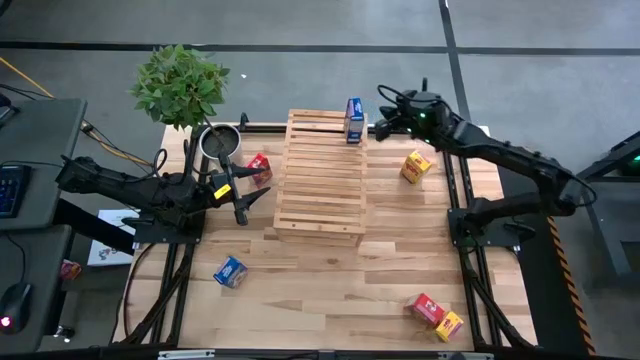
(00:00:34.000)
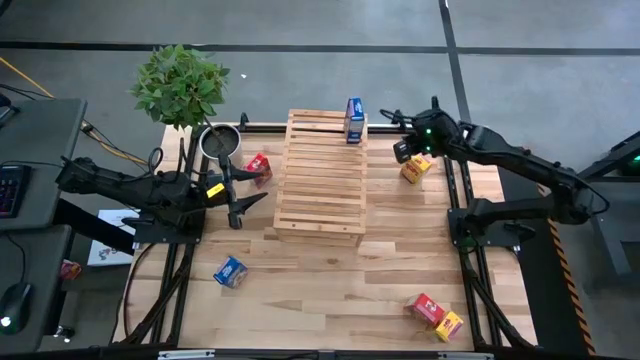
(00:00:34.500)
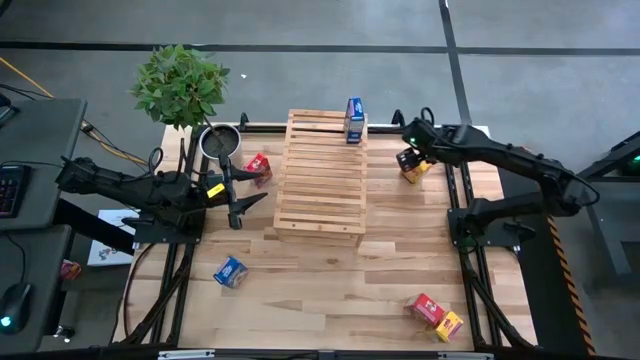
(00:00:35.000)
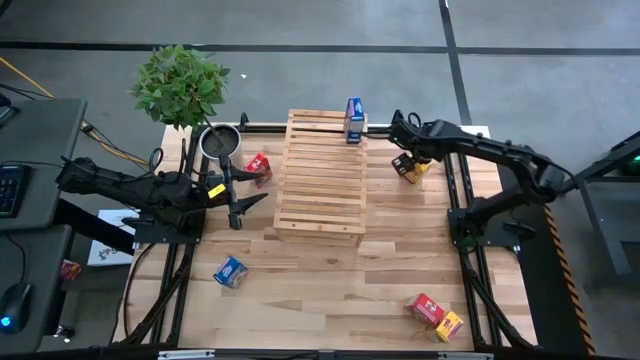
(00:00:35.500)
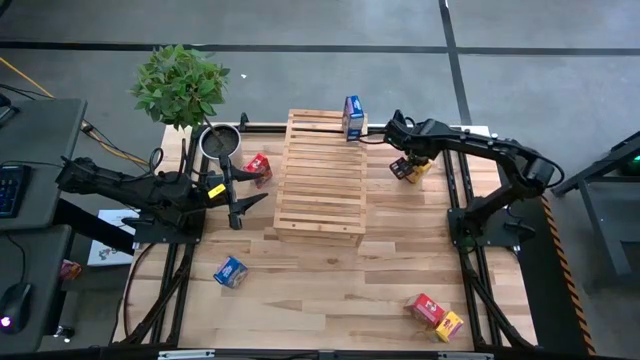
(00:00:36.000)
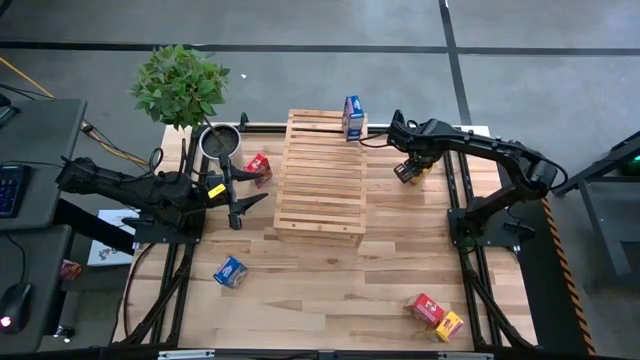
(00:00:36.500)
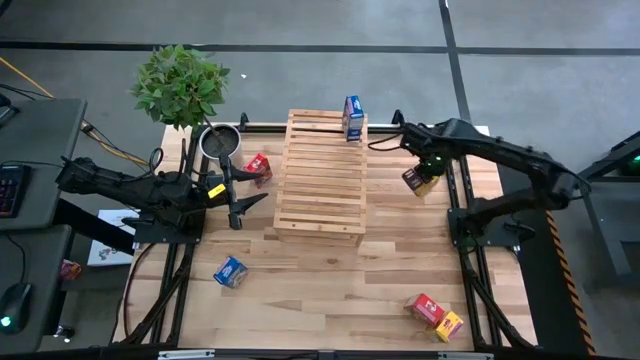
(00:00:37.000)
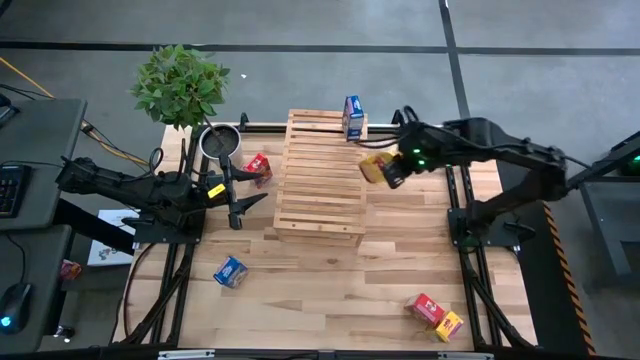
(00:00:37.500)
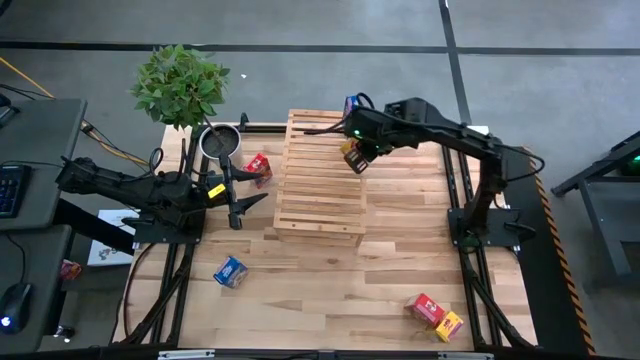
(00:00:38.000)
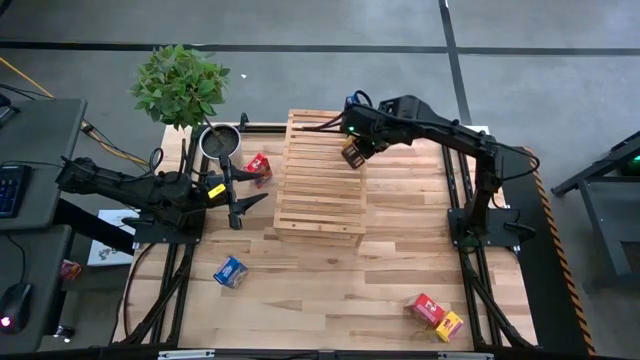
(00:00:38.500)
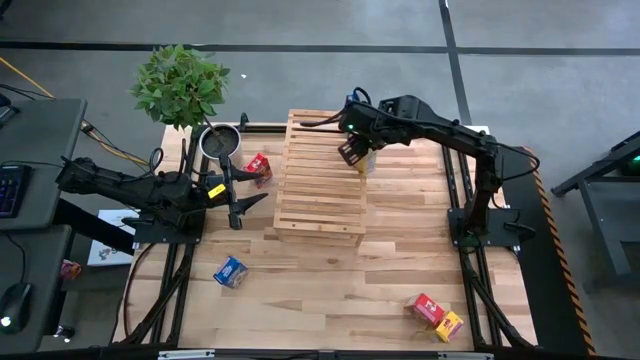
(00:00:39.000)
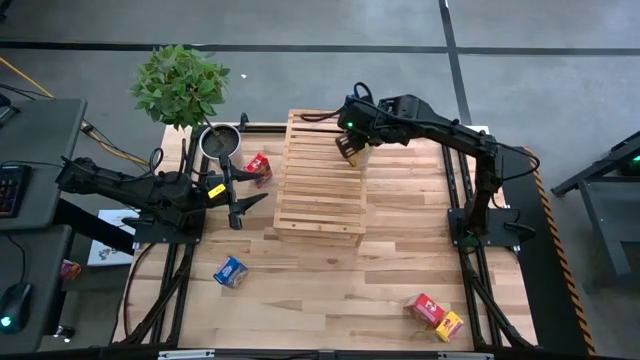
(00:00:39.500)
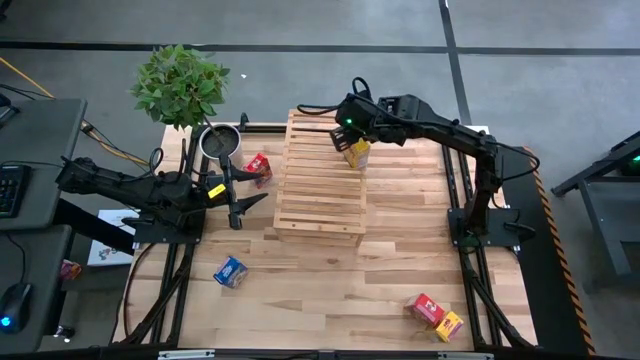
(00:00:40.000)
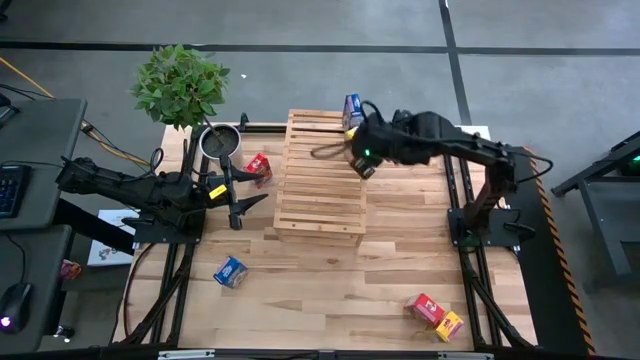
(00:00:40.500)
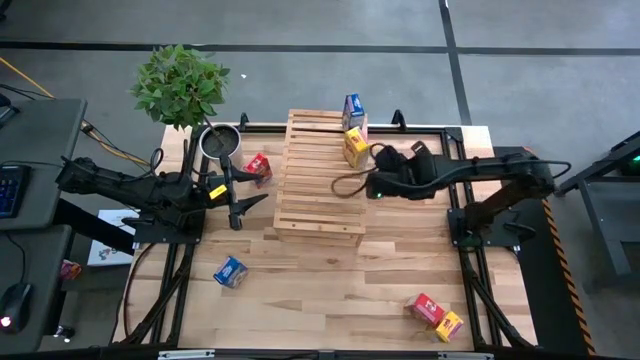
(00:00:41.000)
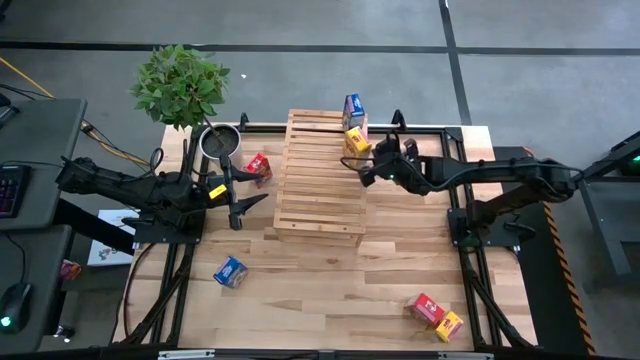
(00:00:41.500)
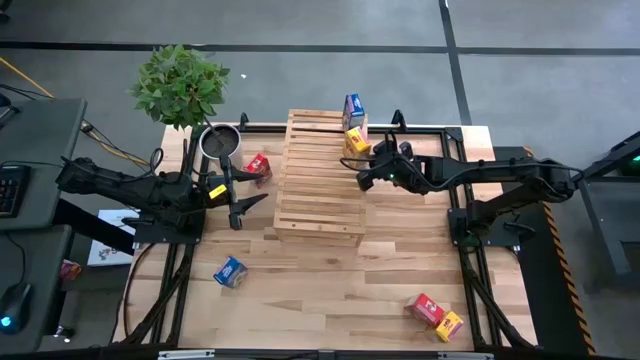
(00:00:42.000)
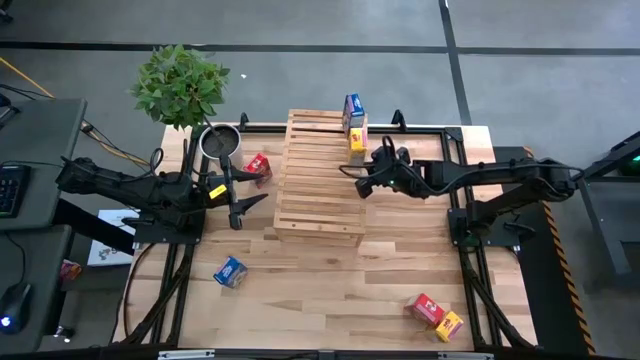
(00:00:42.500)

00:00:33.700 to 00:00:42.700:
Task: Stack cereal on shelf
Put the top yellow cereal box on the shelf

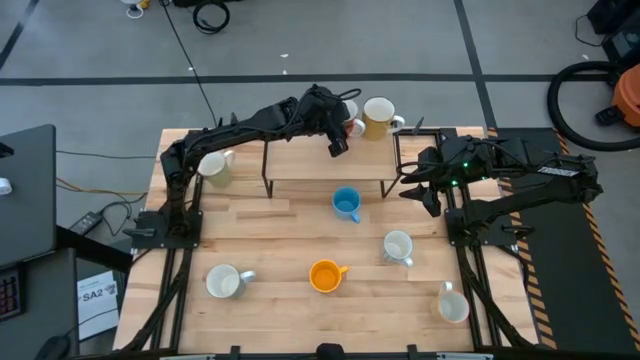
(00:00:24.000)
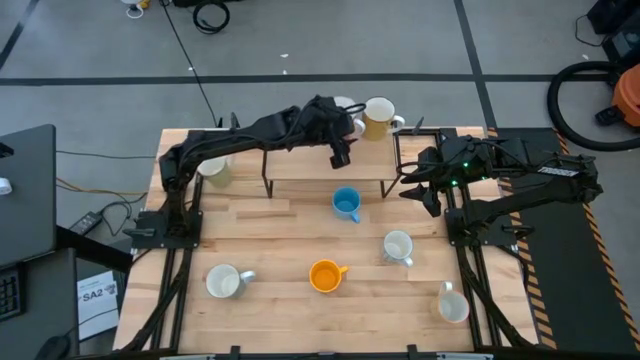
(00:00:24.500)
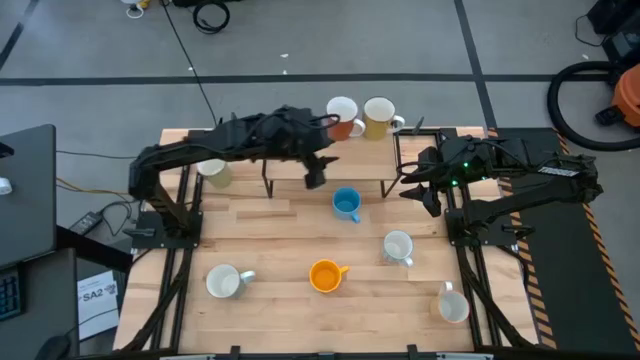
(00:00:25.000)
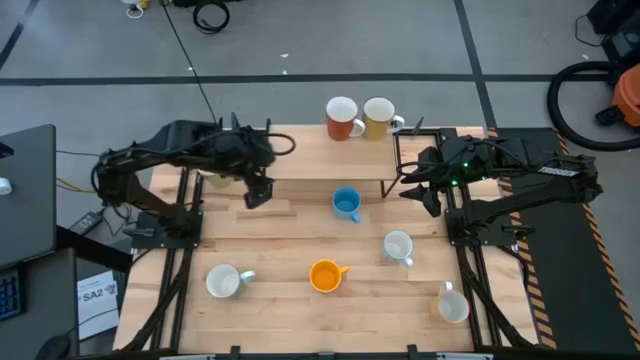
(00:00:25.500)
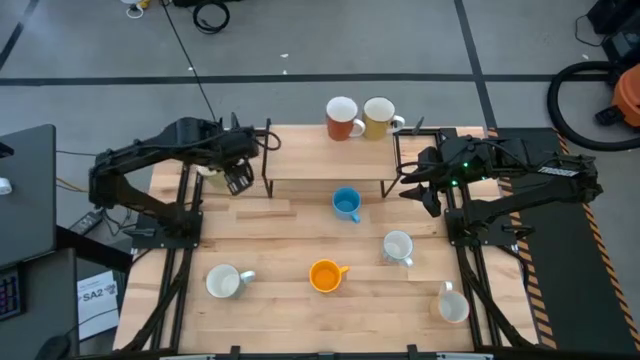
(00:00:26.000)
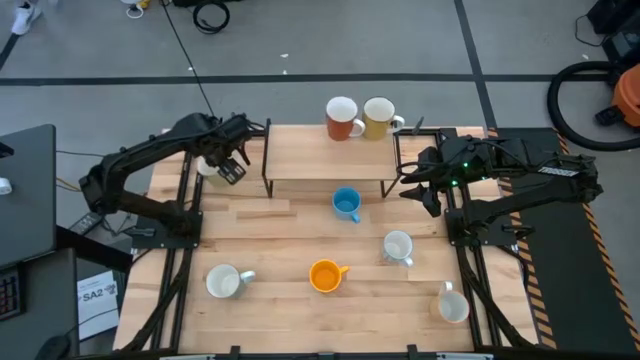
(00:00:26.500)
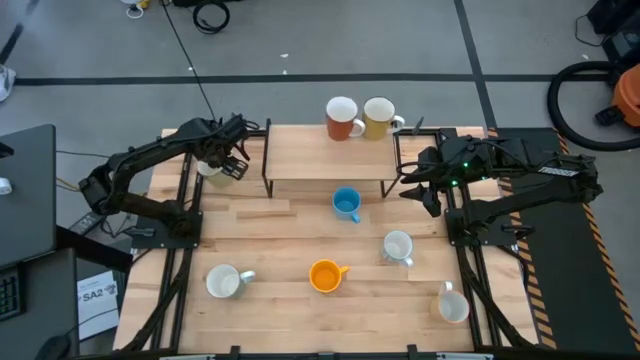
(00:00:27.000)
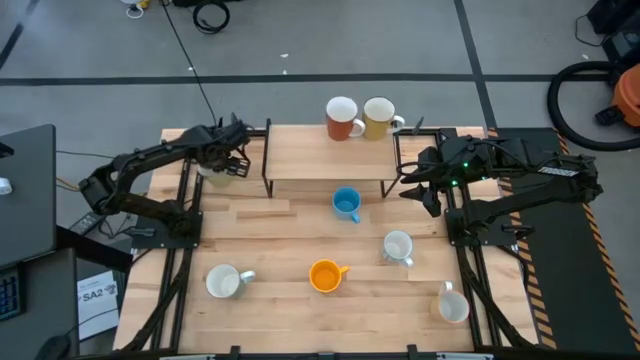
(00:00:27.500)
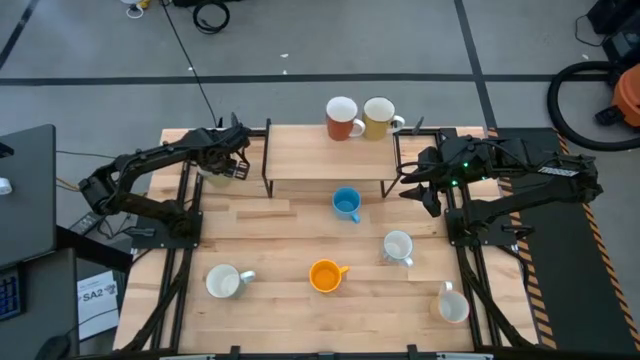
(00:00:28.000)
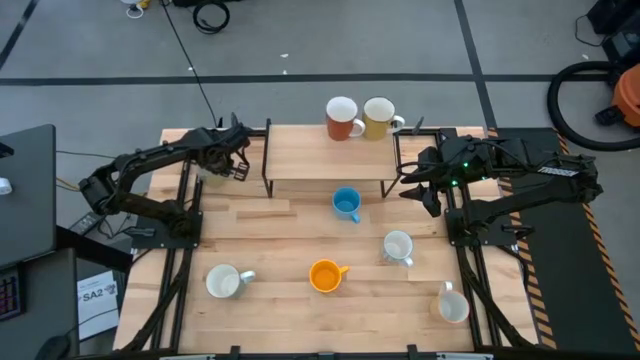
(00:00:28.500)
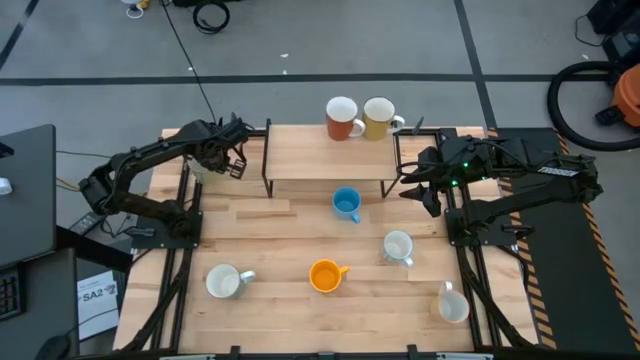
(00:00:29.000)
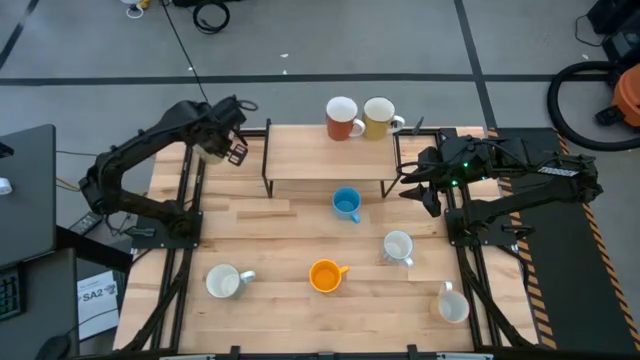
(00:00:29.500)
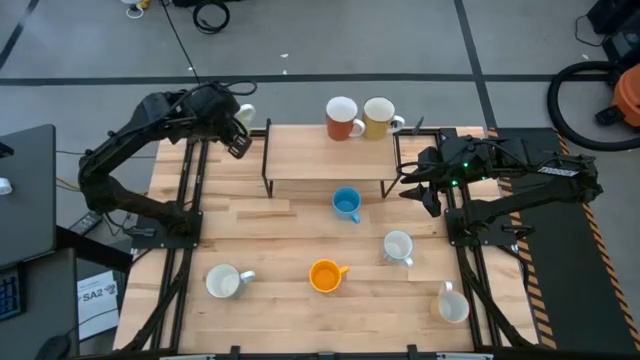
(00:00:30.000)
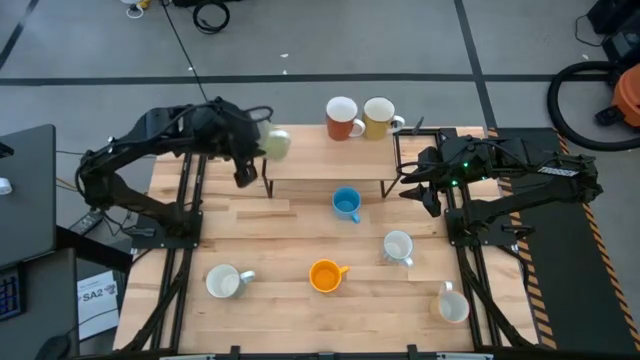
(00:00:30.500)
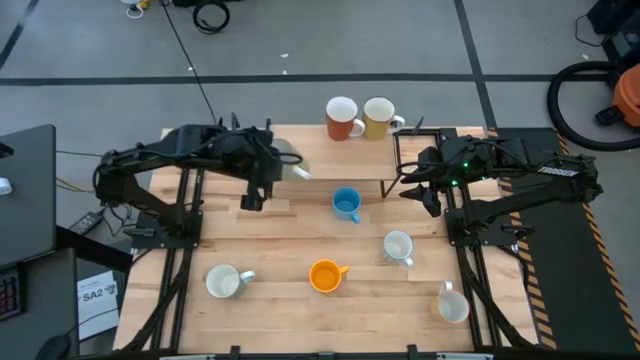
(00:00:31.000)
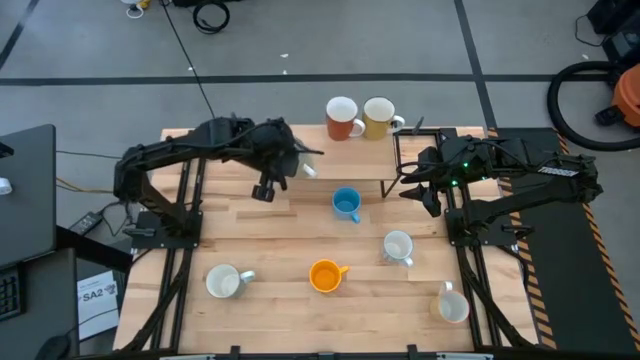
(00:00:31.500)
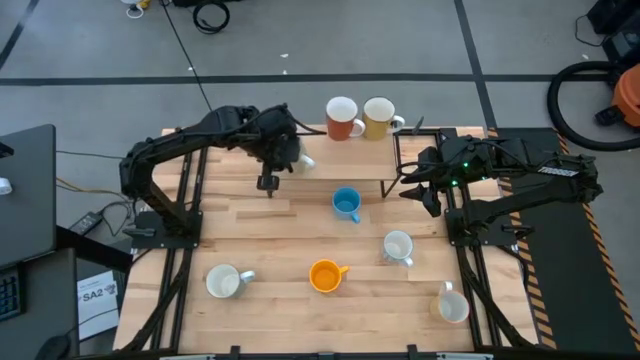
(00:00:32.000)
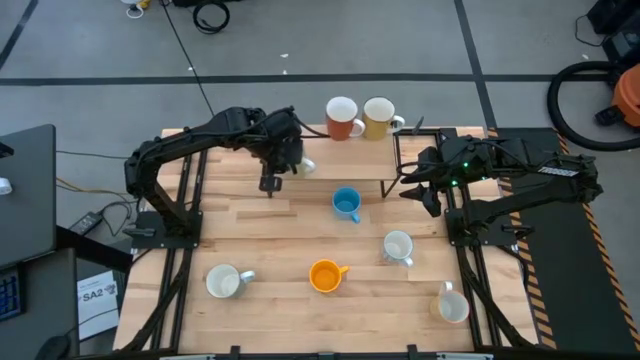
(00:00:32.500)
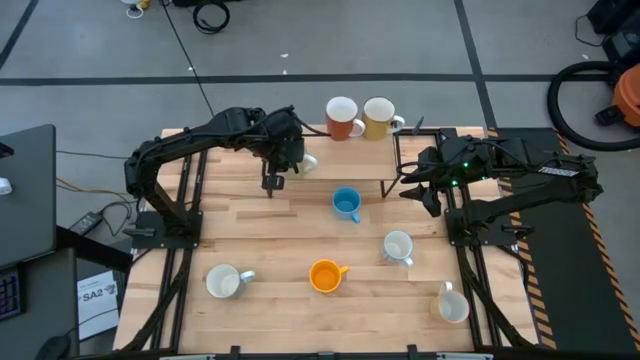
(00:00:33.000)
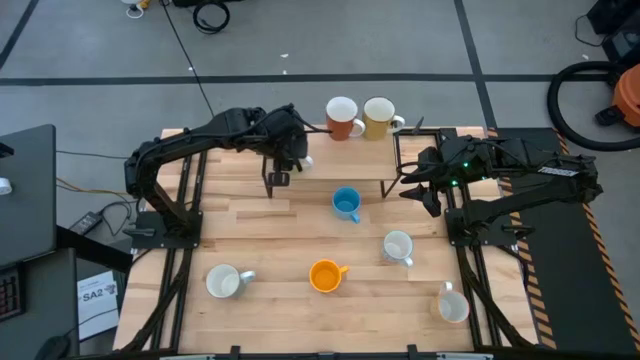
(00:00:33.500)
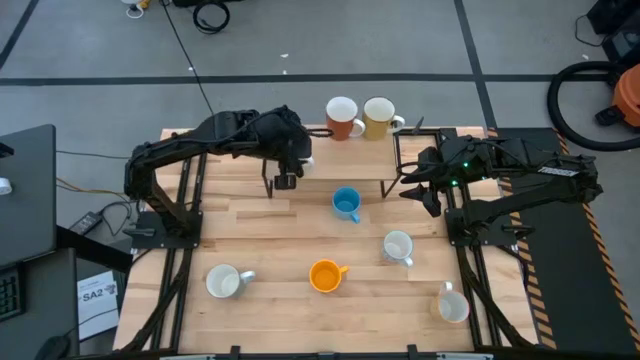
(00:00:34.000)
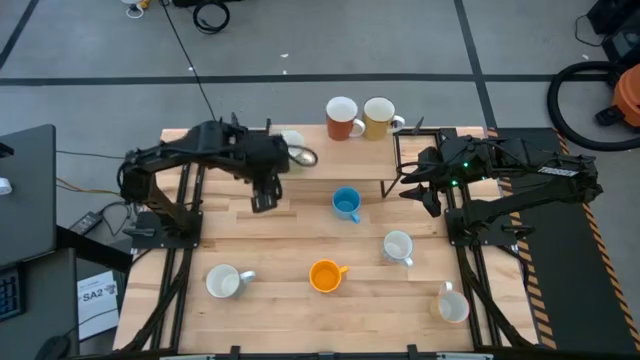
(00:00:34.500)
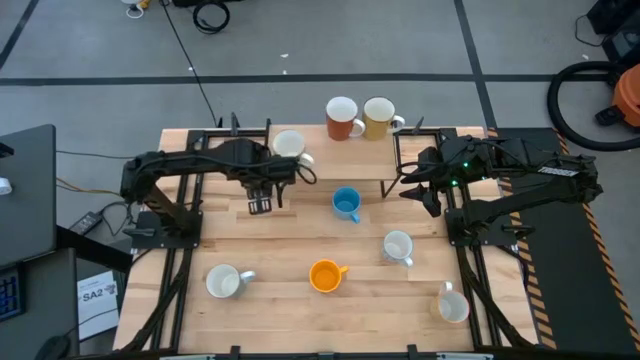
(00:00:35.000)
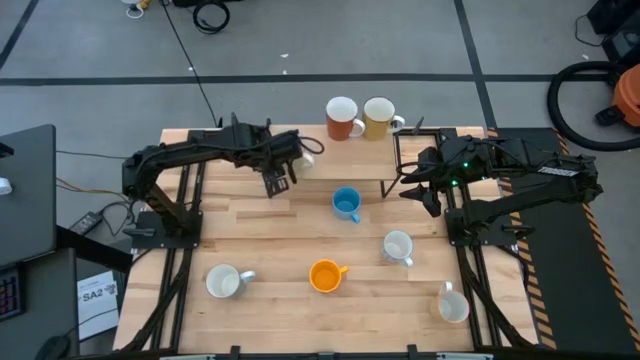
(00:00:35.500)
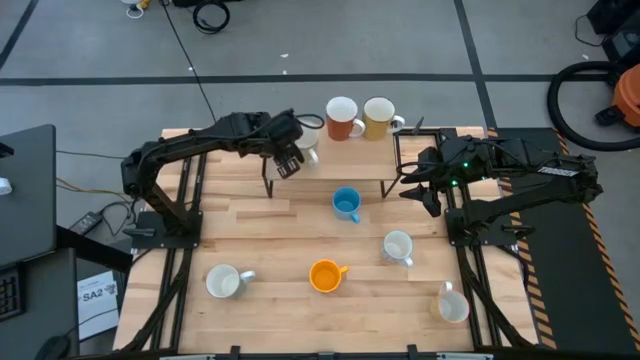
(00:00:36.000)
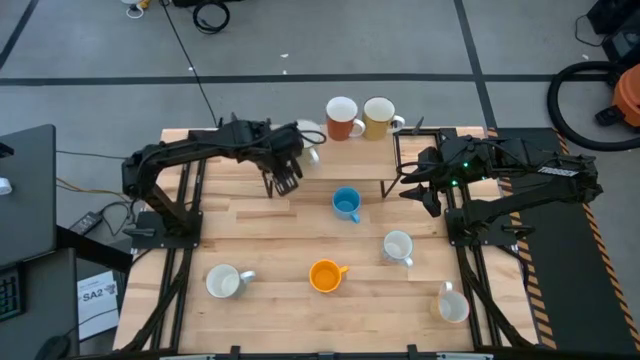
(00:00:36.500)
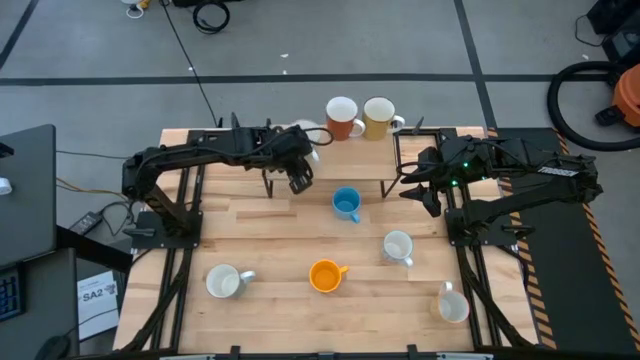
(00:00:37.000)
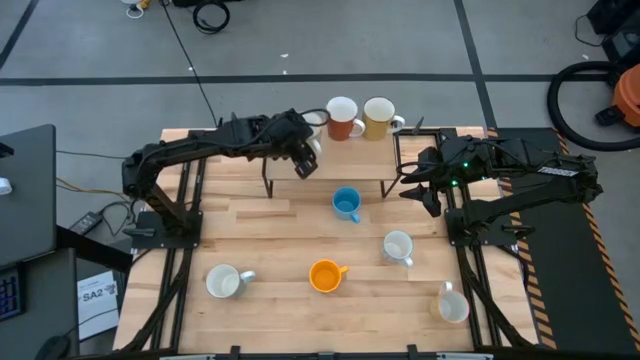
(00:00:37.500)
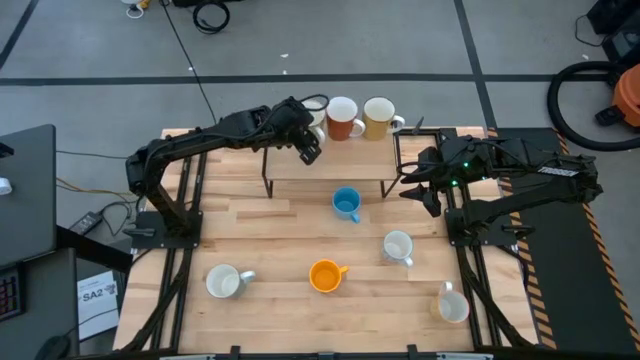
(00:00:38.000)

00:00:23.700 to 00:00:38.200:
Task: Place coffee mugs
Put the green mug on the shelf
